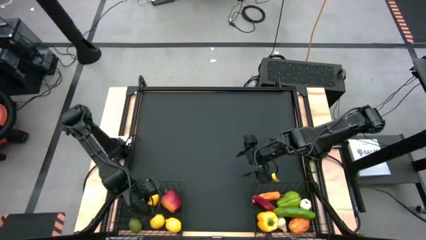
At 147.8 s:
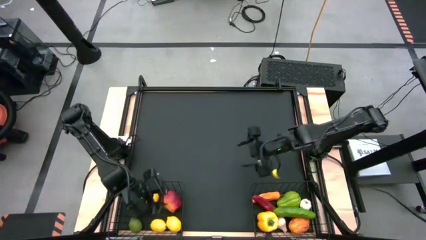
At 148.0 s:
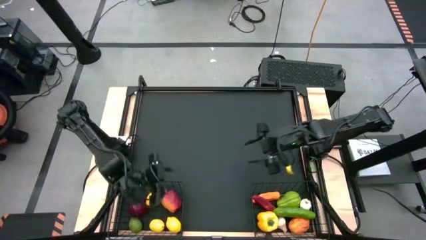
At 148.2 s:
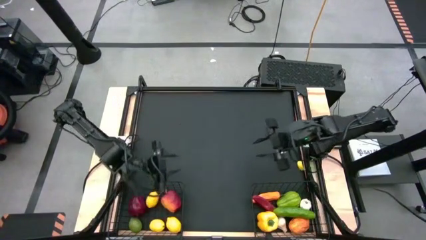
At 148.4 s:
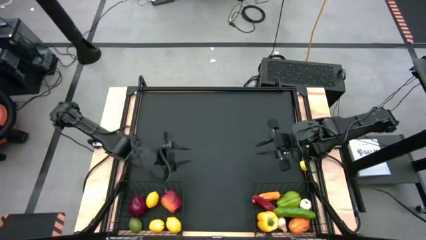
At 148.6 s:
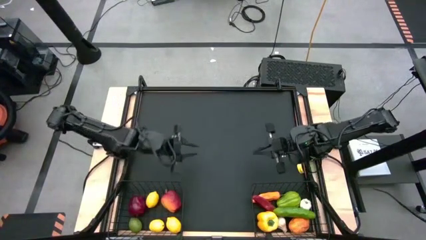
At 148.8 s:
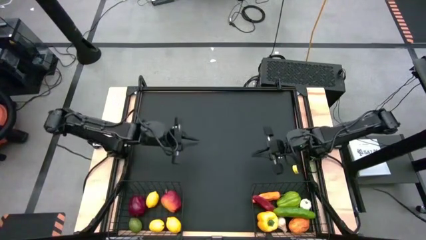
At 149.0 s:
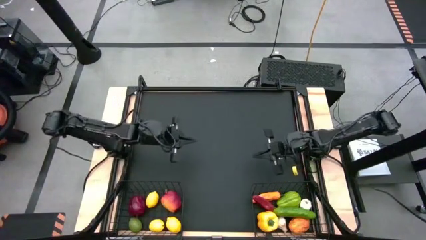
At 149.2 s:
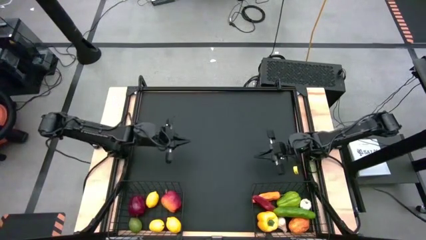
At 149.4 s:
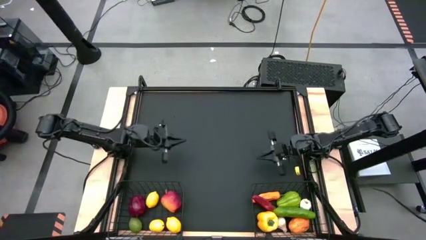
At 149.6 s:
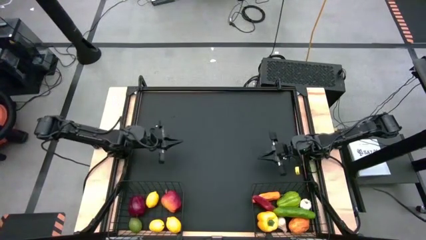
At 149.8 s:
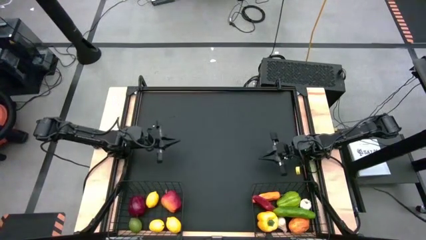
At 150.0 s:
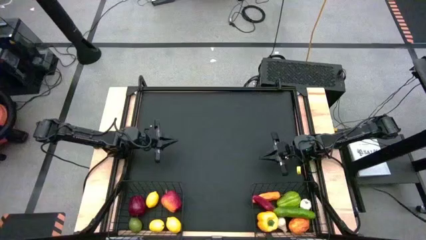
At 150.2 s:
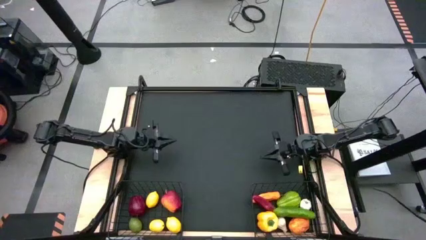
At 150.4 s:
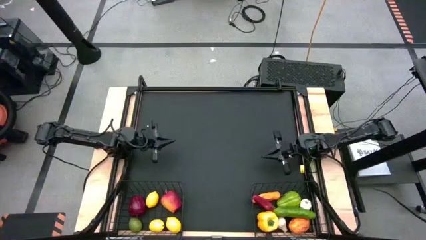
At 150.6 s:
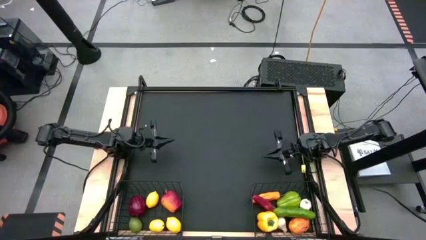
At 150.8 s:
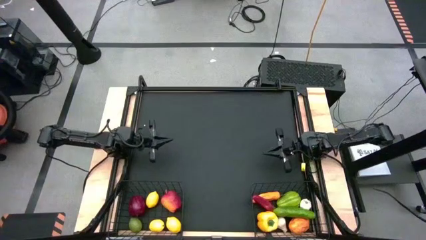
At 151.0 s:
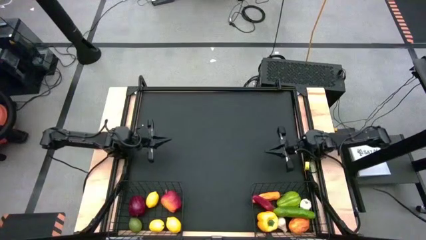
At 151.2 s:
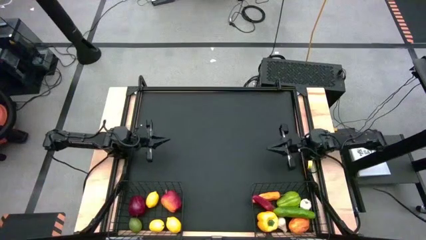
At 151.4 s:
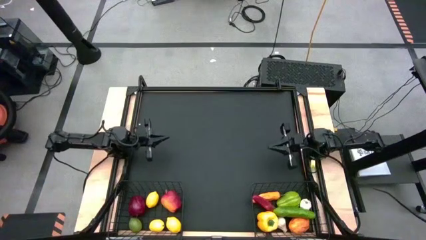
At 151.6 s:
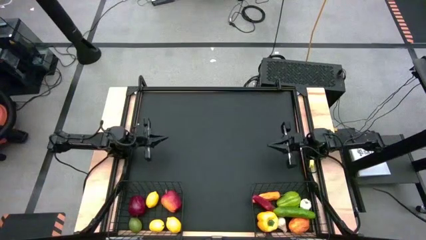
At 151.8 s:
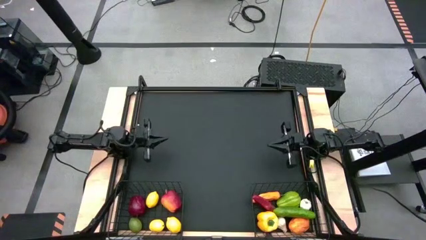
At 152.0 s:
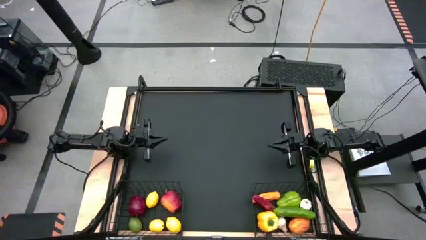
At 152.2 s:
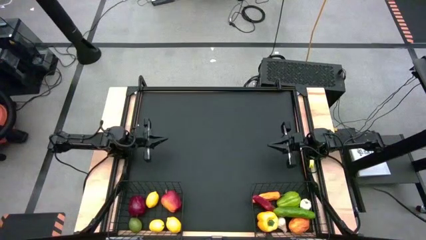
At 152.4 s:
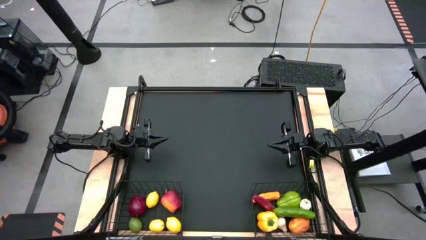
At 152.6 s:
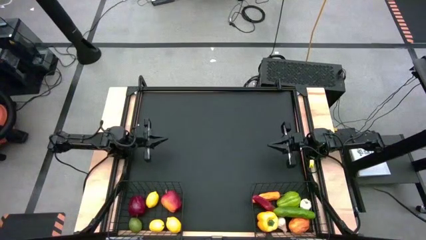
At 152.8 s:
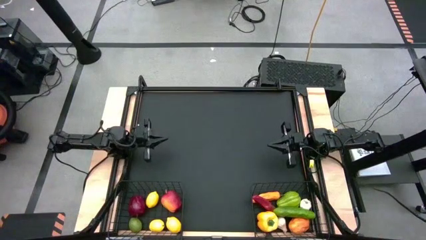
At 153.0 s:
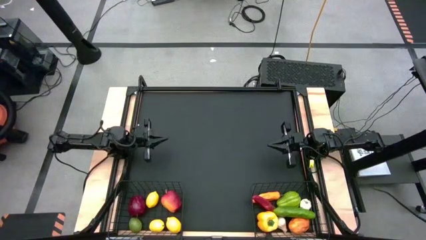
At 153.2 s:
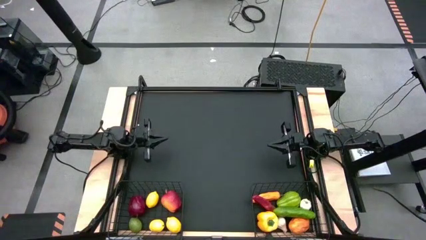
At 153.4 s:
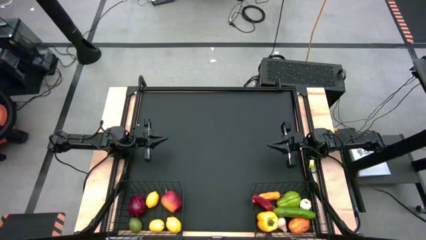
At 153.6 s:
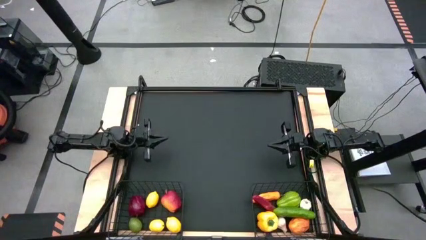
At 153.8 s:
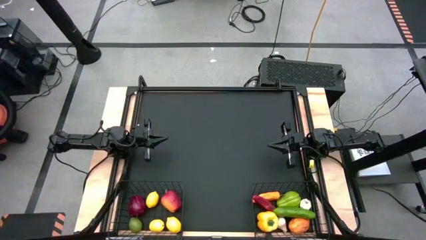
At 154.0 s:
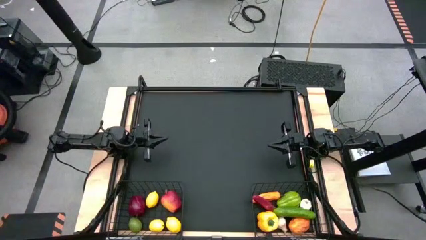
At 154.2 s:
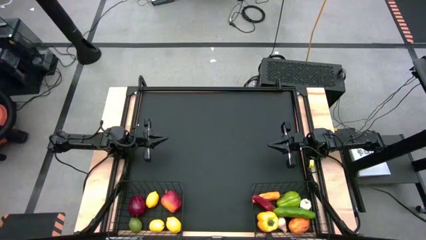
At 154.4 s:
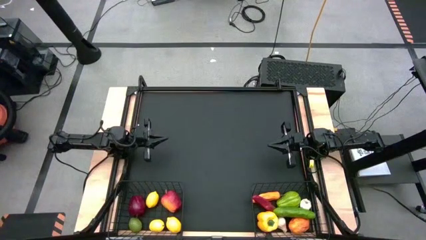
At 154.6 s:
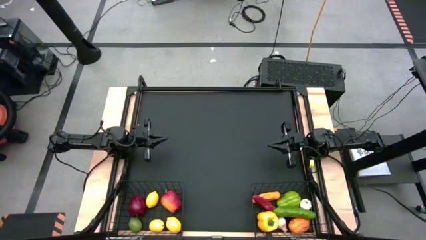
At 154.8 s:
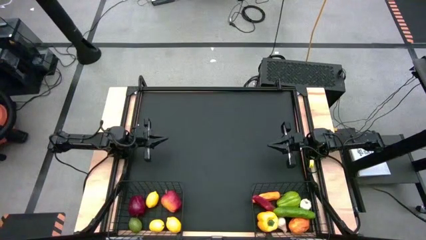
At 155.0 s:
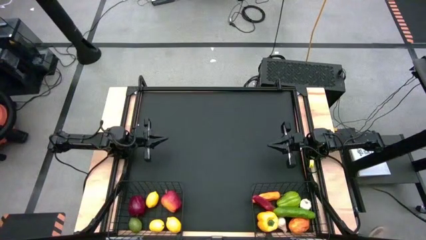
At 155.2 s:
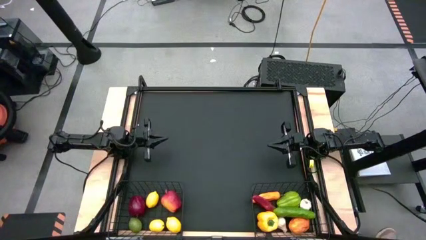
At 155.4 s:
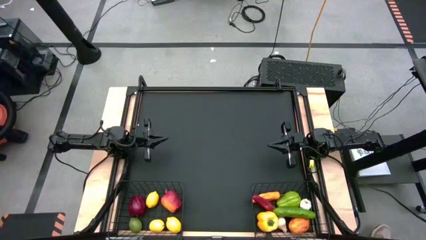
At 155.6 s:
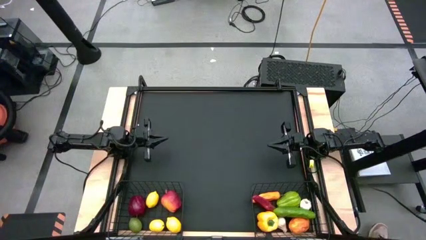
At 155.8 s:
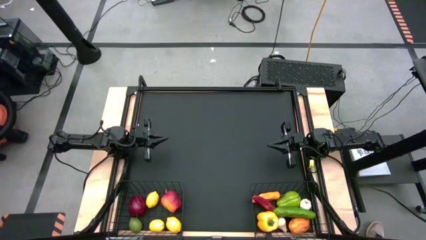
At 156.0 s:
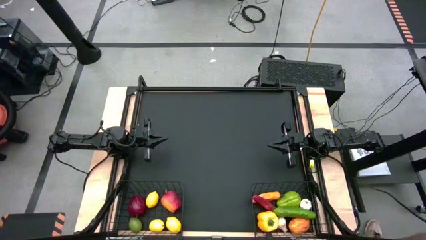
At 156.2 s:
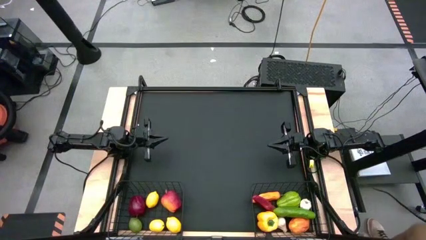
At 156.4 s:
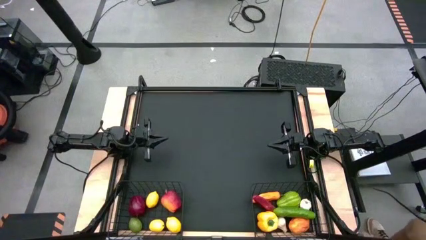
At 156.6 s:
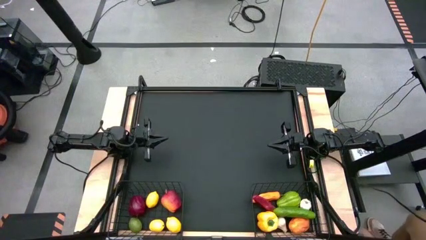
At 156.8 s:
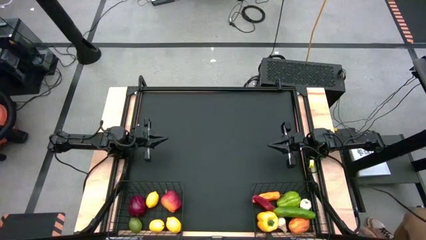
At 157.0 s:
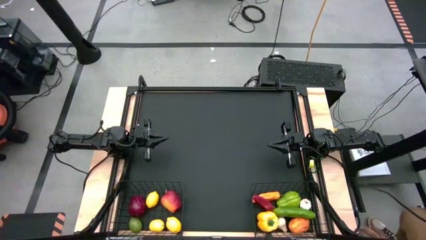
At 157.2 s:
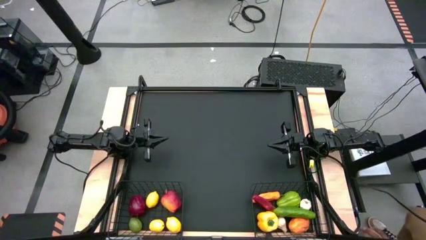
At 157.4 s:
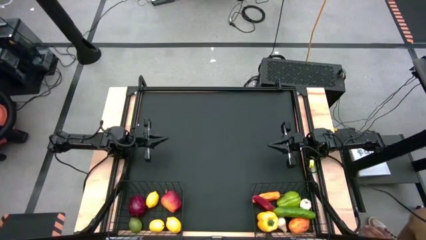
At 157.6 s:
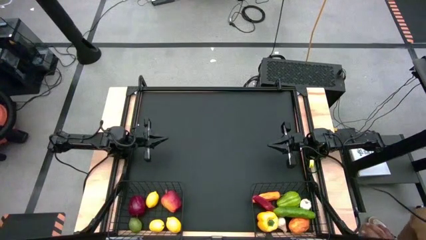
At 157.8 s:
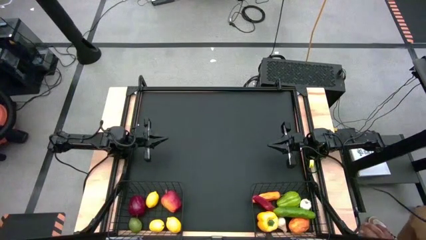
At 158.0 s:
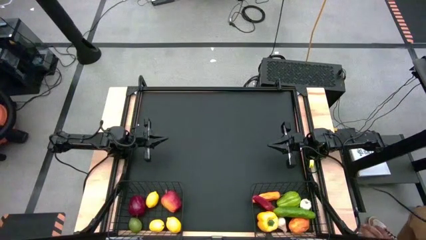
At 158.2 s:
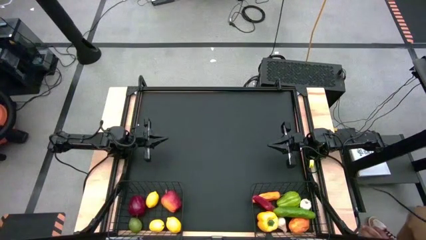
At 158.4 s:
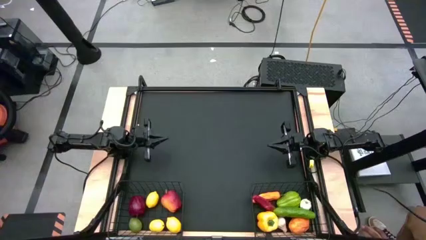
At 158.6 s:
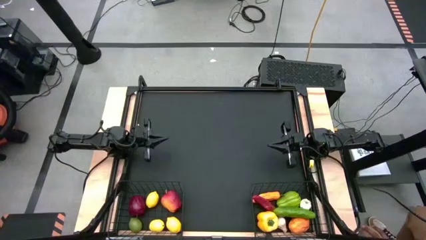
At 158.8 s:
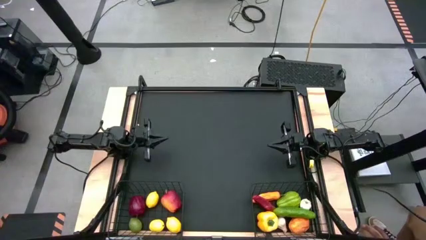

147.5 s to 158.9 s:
Task: Sort produce into baskets
Return to Home Position

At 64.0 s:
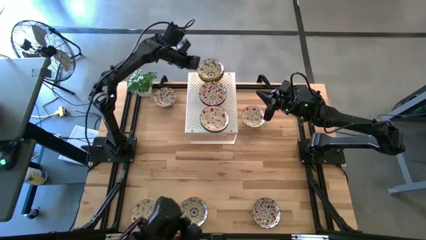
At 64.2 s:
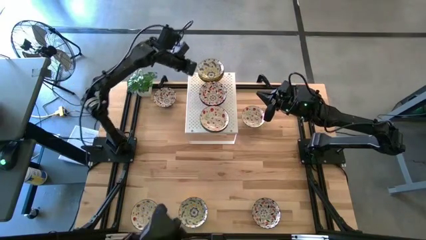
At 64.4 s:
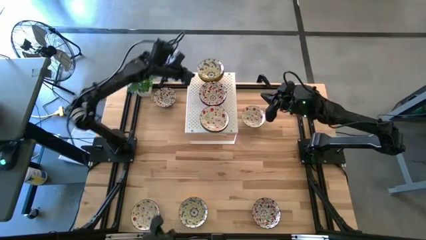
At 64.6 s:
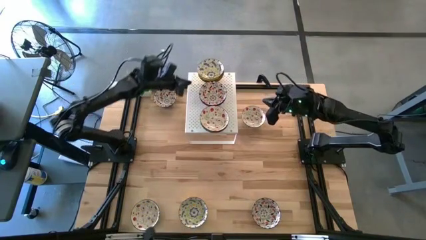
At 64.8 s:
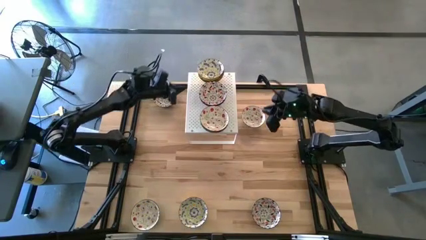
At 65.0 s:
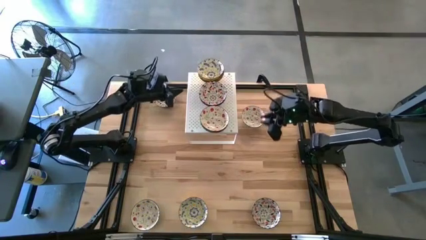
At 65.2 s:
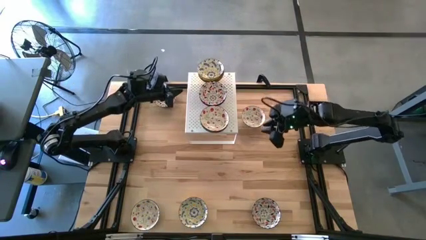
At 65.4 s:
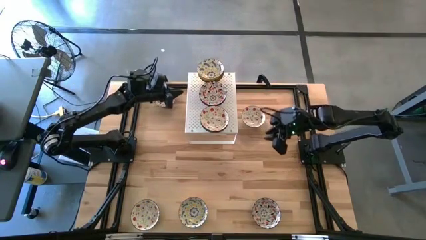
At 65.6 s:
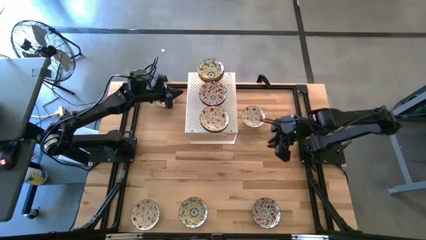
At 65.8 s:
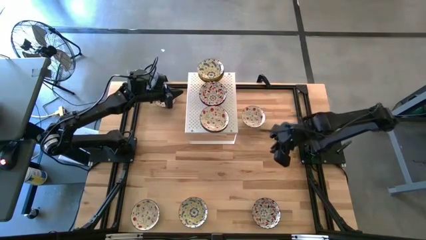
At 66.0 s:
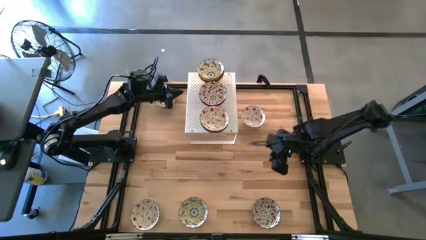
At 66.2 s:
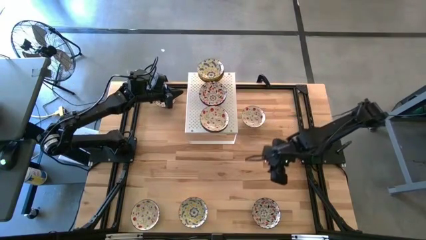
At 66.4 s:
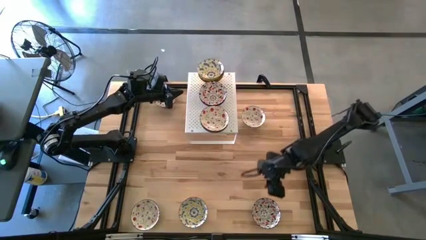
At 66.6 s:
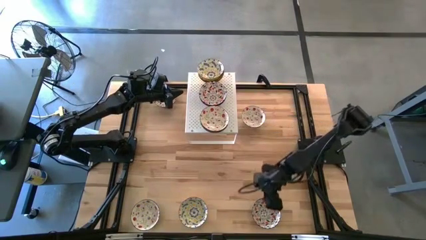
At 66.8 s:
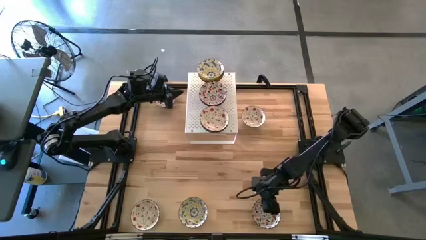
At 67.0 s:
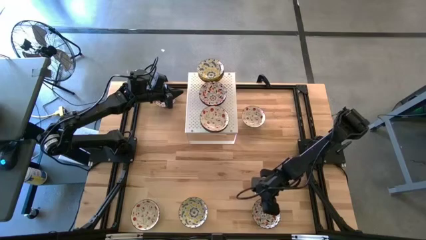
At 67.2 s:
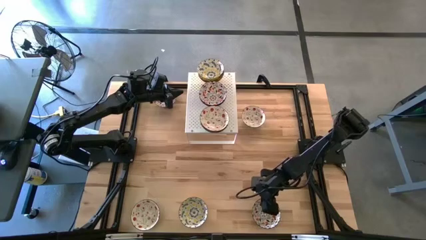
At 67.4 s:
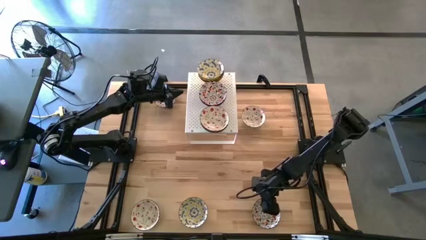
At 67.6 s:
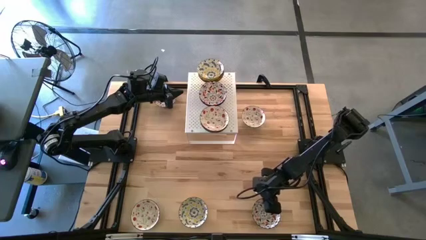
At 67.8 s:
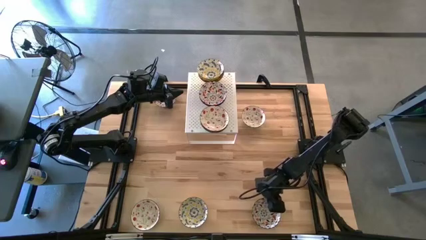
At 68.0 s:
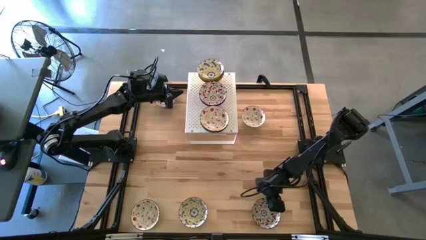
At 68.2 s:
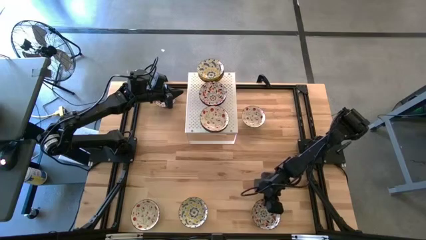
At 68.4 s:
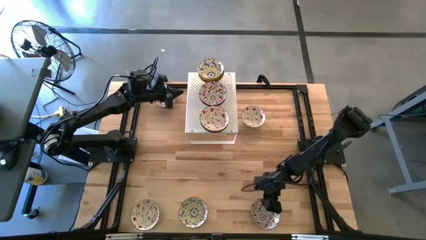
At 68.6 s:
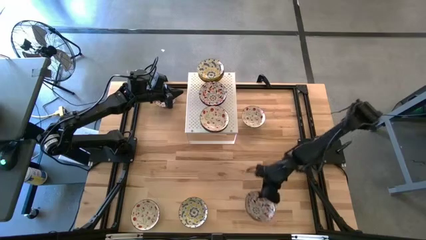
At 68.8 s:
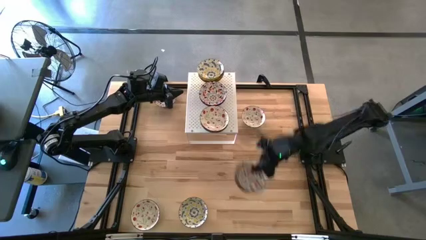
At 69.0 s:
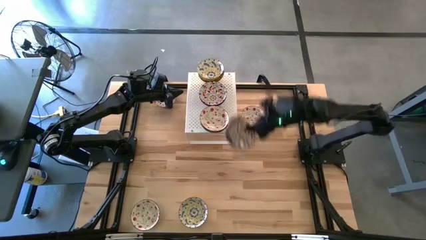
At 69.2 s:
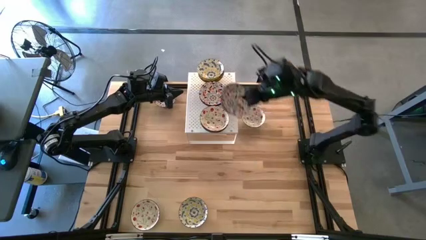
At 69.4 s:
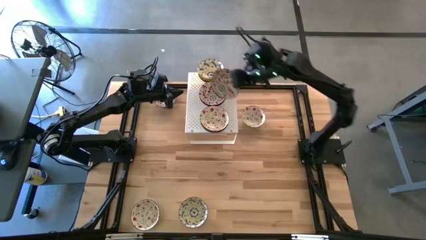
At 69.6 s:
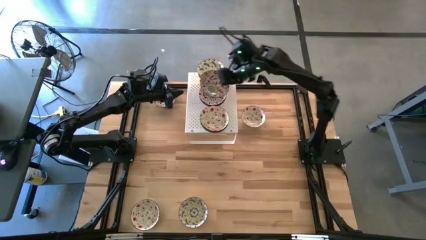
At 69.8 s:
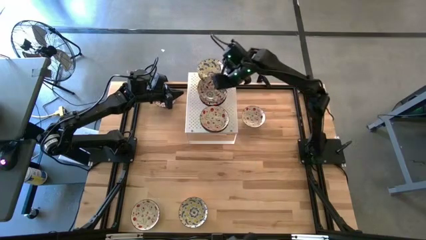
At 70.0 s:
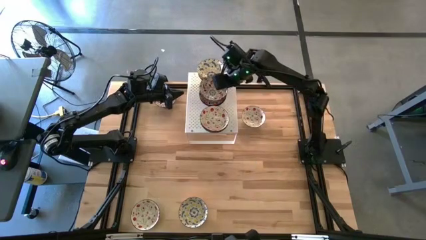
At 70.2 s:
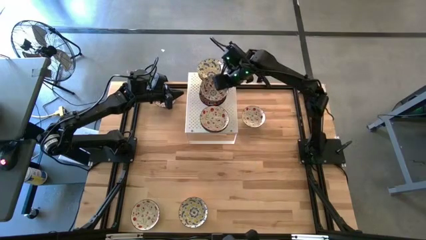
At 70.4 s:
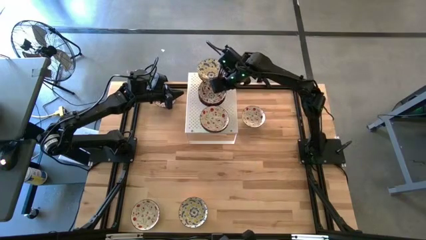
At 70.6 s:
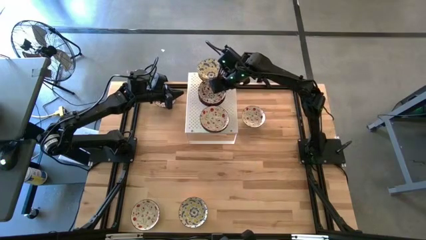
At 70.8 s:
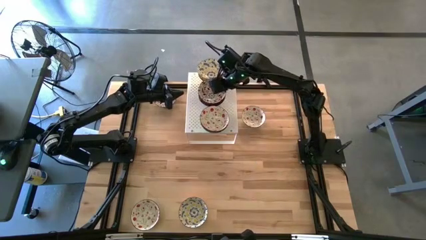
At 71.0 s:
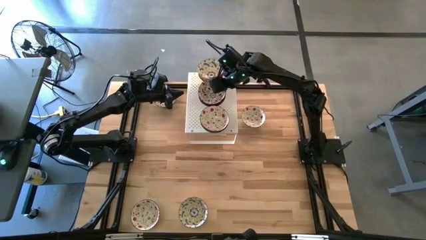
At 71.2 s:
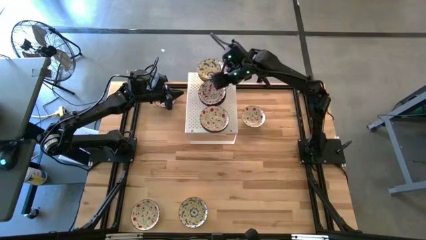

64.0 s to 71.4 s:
Task: Pick & Place Mini bowls
Stack the orange patterned bowl on top of the orange patterned bowl on the shelf
